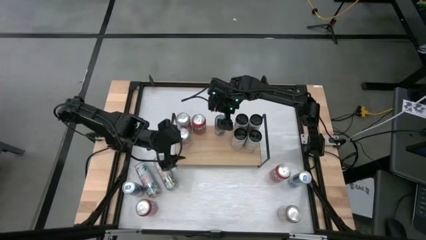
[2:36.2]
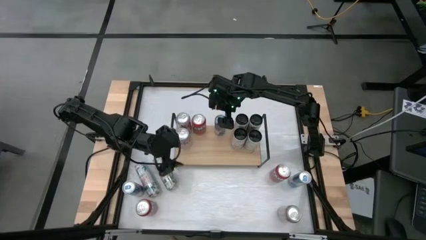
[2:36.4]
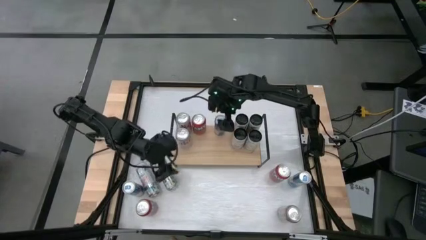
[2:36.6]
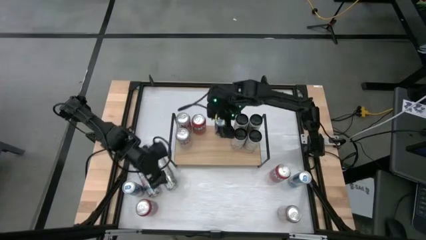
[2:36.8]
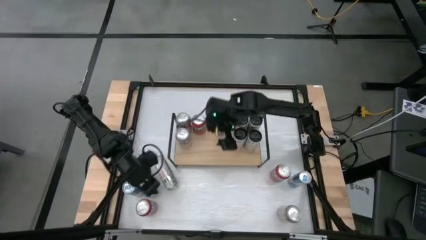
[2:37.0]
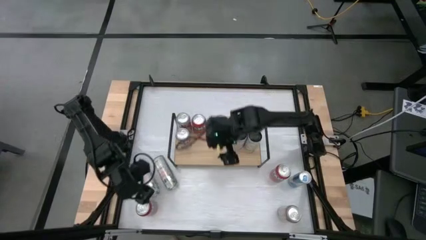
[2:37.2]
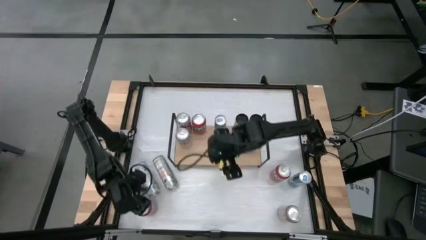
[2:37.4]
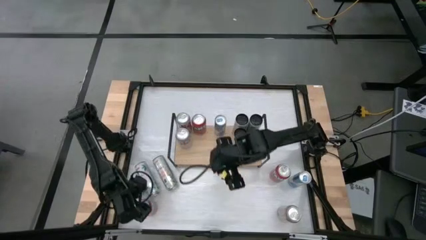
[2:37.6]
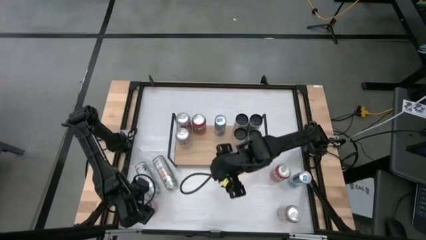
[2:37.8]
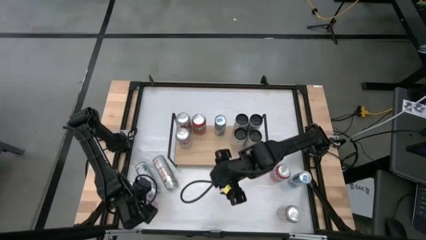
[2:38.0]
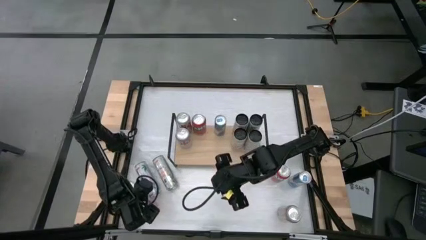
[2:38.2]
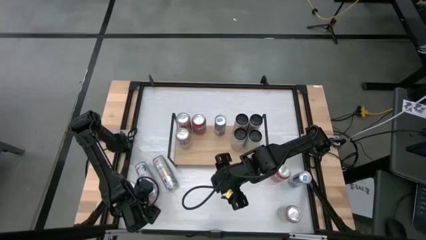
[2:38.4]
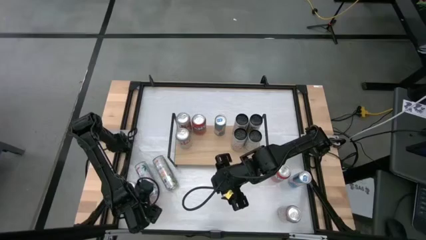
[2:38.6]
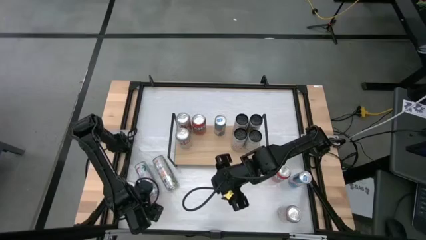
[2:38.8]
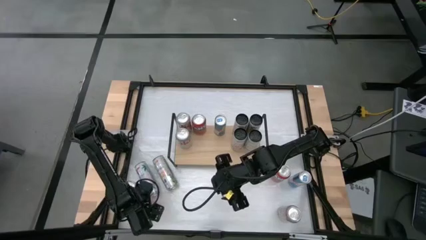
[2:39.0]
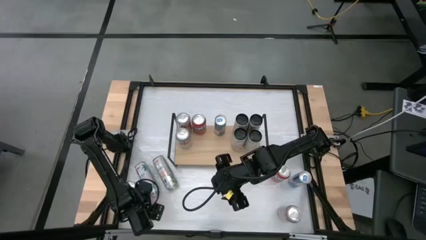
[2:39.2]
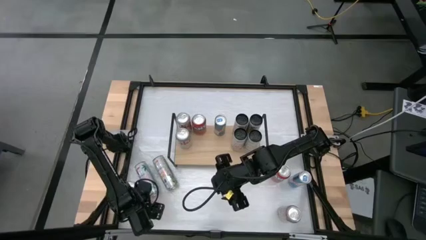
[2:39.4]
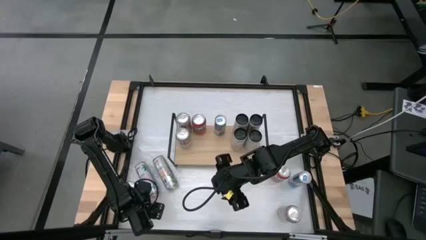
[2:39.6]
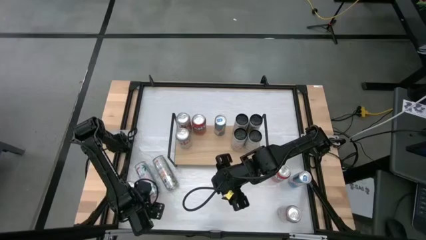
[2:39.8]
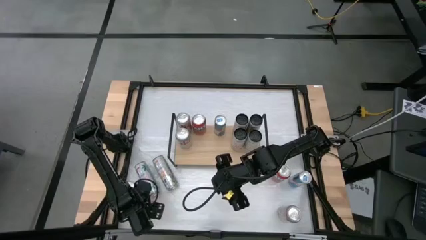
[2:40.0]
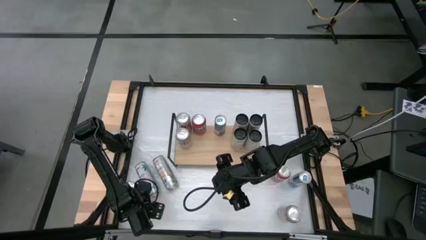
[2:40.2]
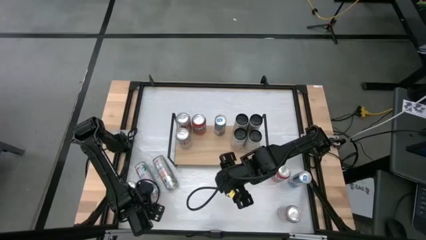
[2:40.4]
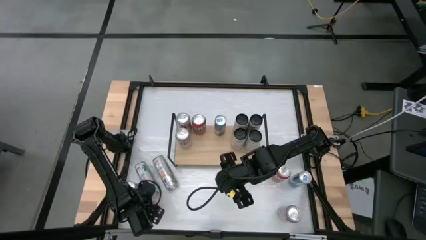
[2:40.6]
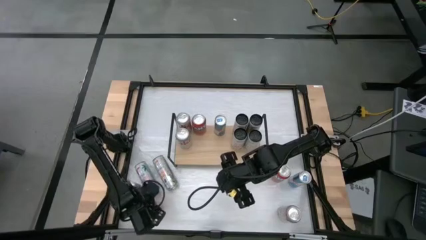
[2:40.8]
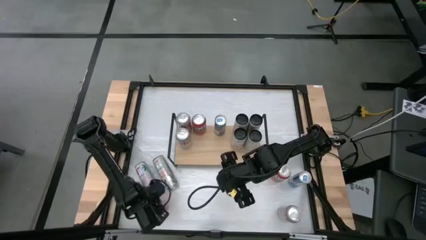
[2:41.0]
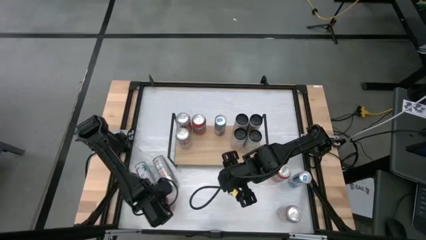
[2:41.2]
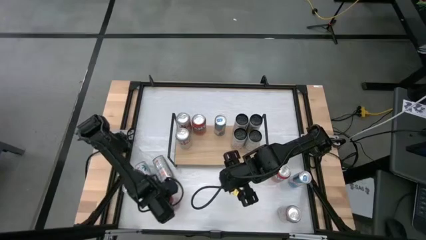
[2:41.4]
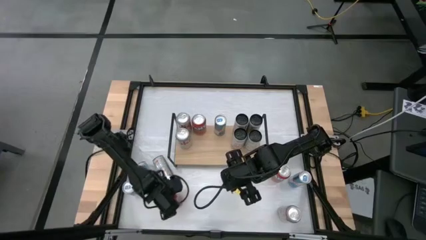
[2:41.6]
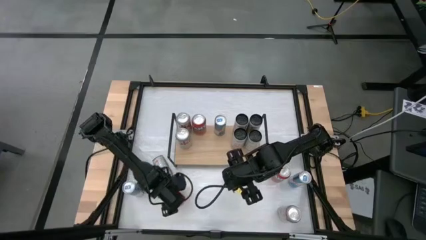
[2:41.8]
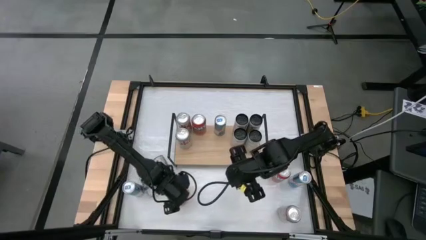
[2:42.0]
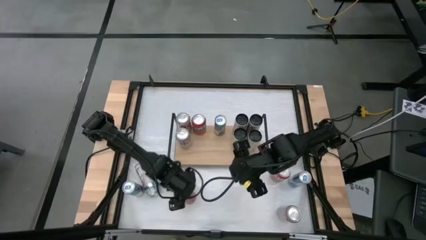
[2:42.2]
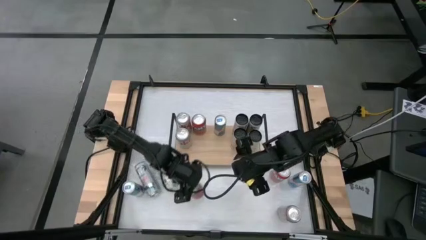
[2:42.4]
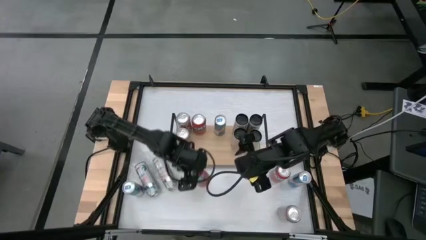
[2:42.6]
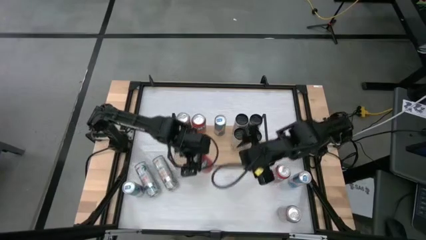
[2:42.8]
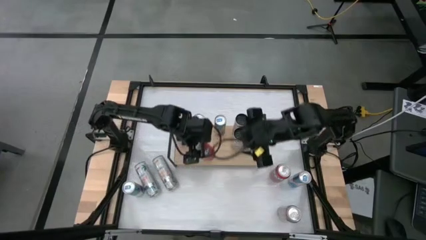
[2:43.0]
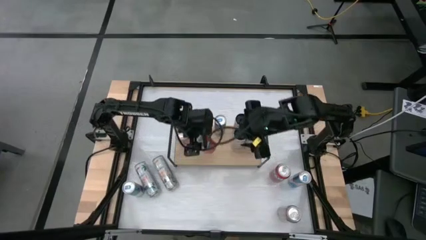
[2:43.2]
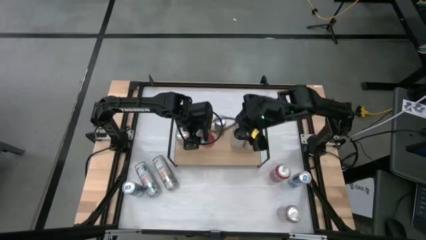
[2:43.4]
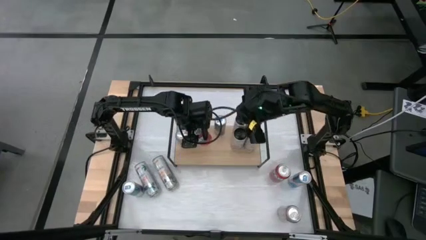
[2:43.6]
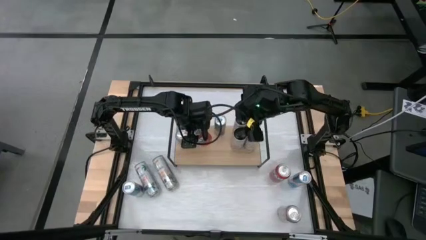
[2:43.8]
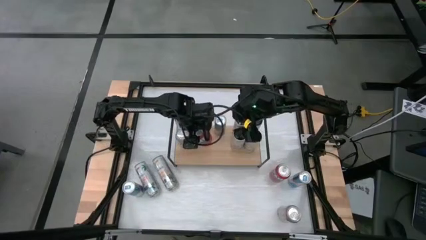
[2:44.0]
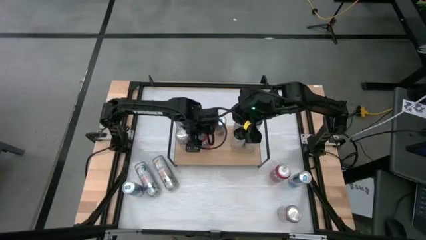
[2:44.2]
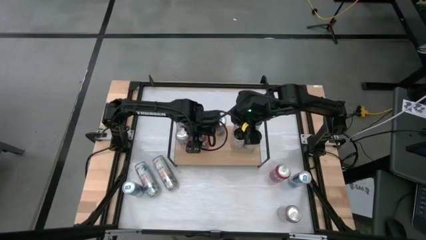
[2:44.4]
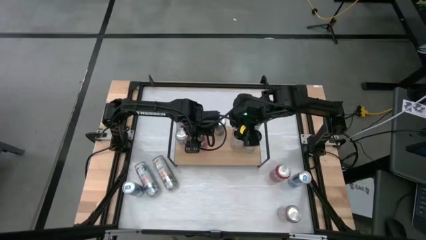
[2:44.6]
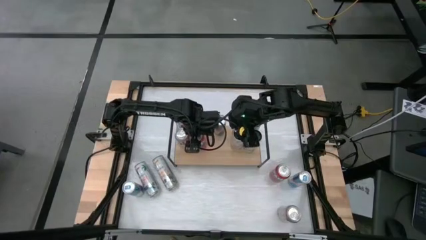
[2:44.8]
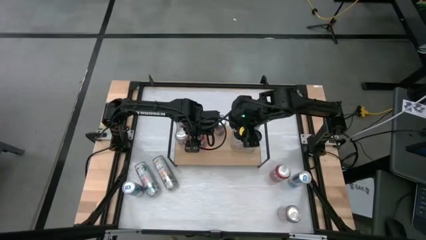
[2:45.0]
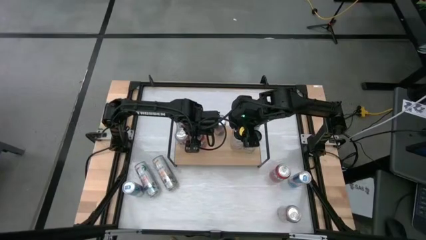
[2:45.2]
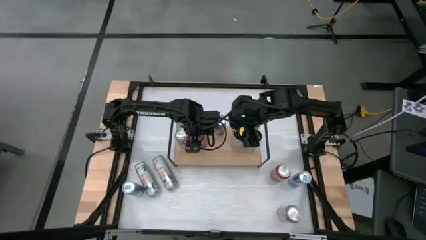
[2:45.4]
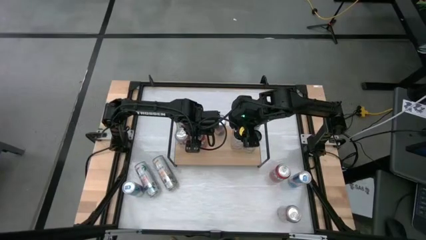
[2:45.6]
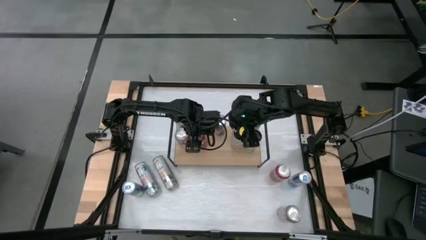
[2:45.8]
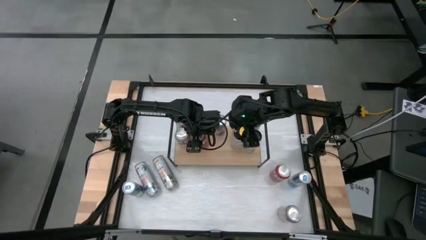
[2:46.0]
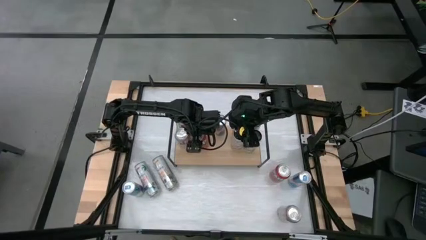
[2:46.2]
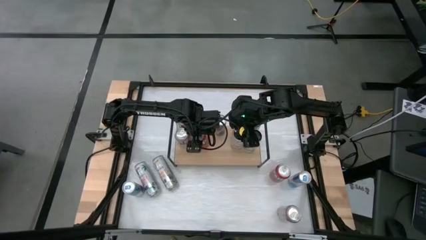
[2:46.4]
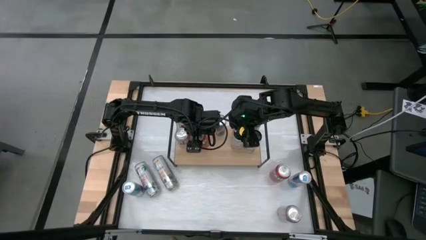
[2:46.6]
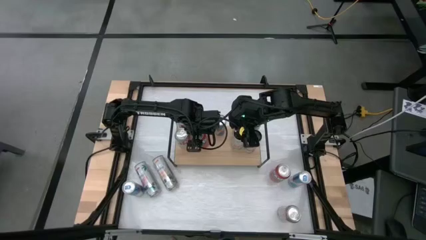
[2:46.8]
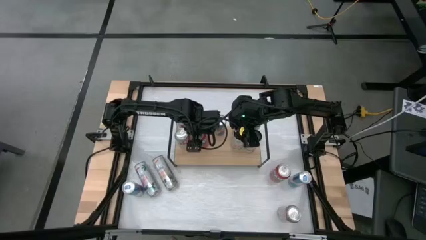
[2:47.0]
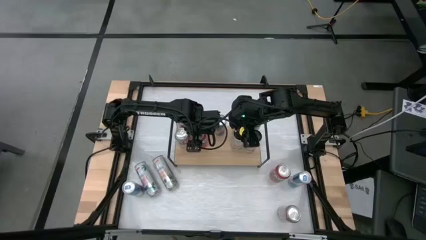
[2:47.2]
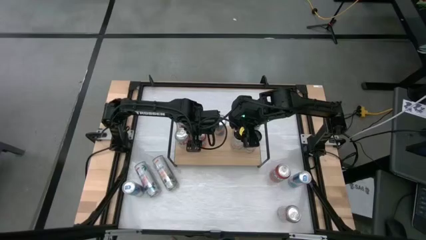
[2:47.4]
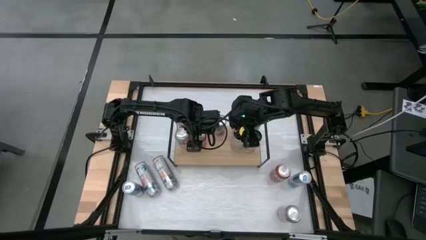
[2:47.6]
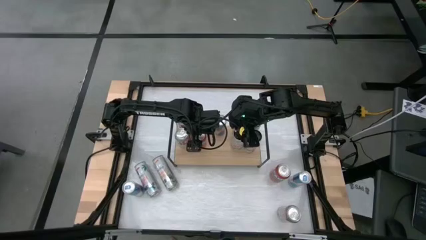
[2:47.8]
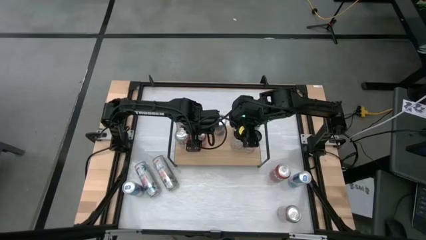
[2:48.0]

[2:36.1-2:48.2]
Task: Place canned beverage on shelf
Put the left red soda can on the shelf aligned with the other red soda can
